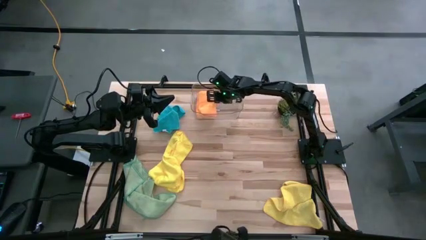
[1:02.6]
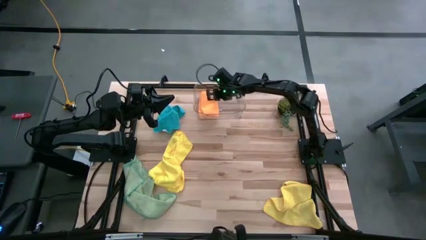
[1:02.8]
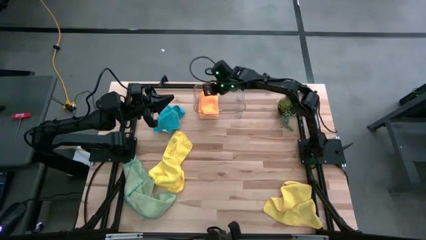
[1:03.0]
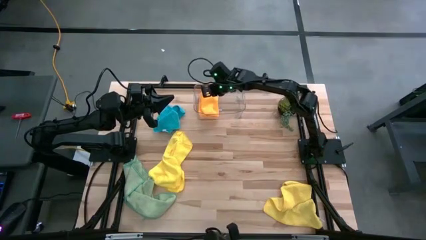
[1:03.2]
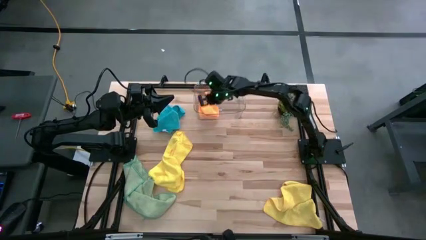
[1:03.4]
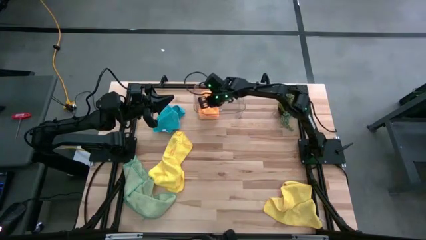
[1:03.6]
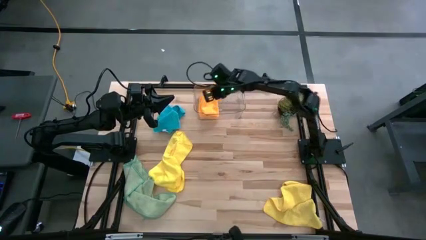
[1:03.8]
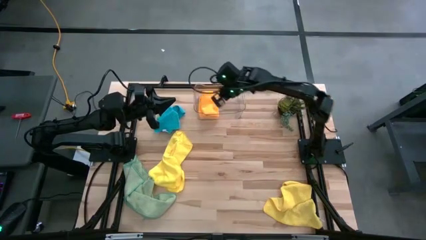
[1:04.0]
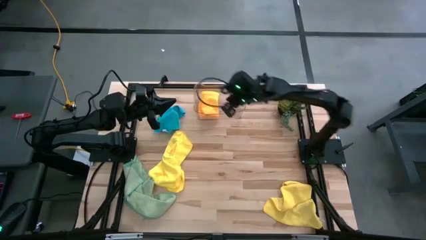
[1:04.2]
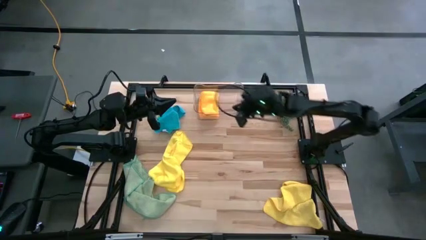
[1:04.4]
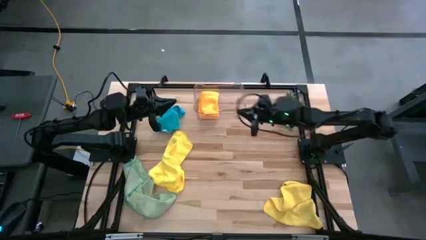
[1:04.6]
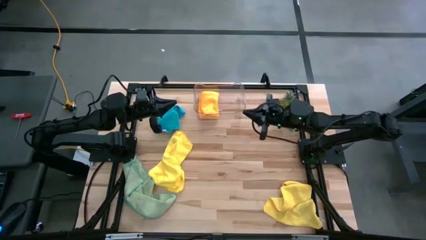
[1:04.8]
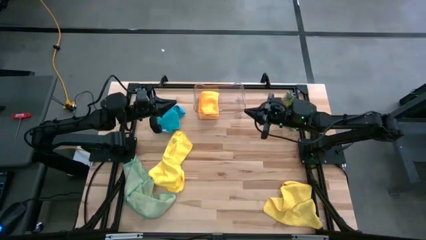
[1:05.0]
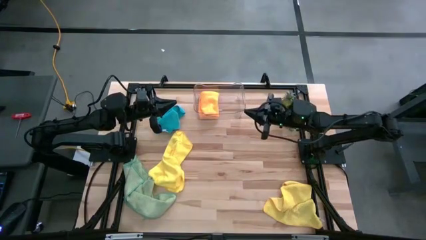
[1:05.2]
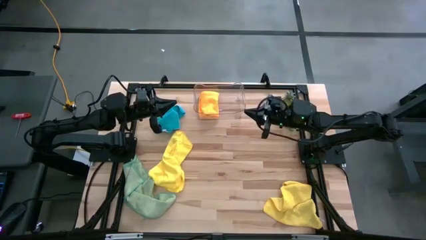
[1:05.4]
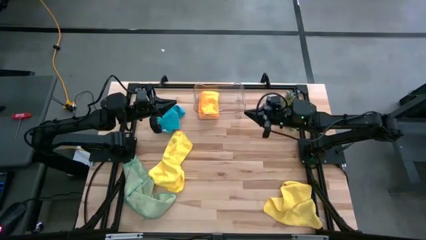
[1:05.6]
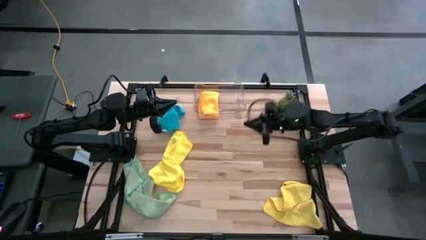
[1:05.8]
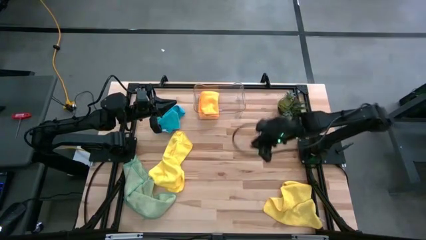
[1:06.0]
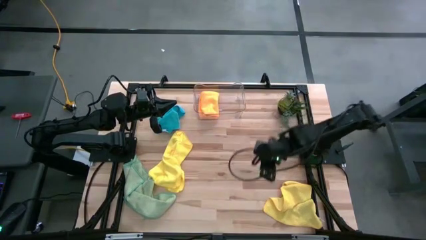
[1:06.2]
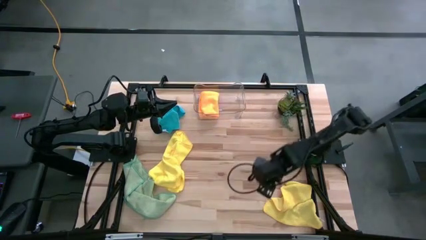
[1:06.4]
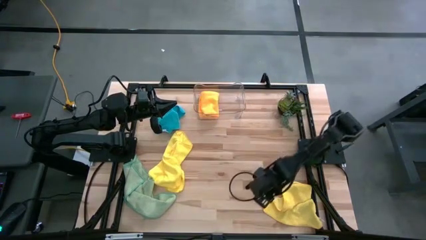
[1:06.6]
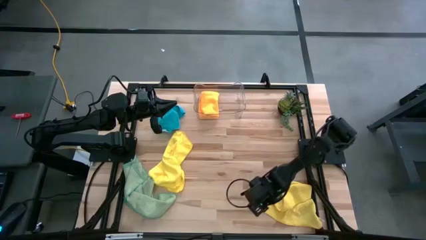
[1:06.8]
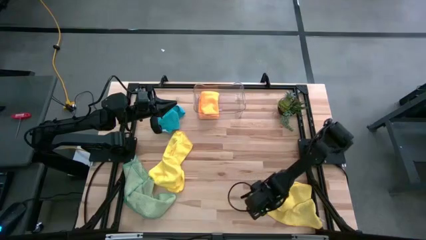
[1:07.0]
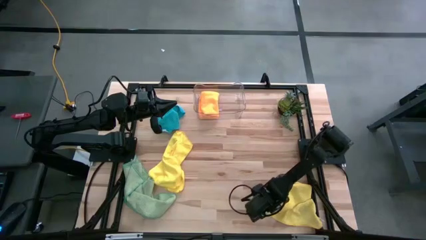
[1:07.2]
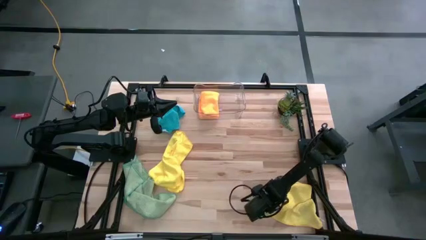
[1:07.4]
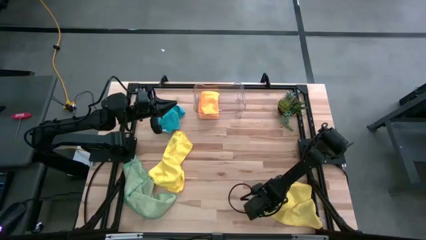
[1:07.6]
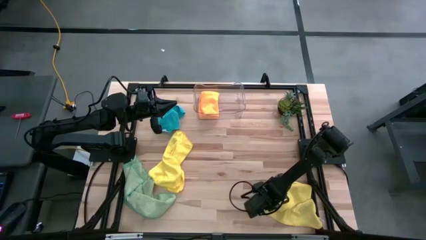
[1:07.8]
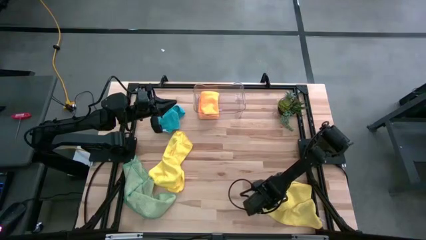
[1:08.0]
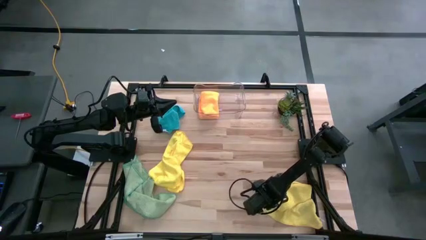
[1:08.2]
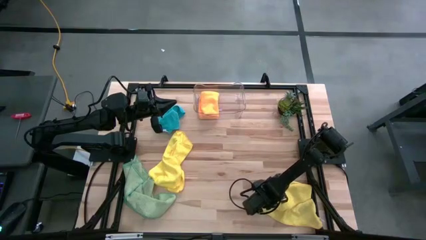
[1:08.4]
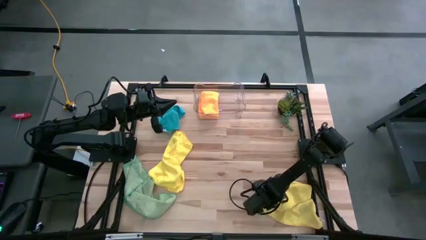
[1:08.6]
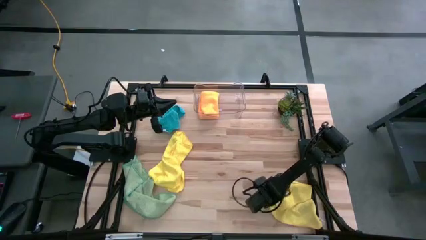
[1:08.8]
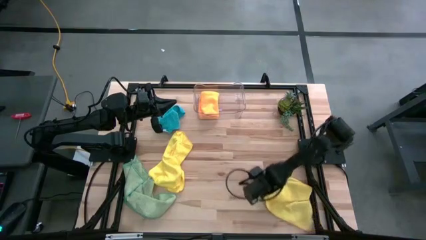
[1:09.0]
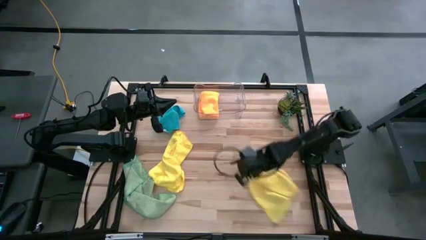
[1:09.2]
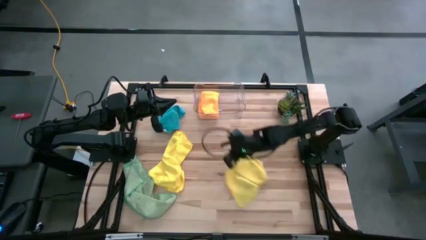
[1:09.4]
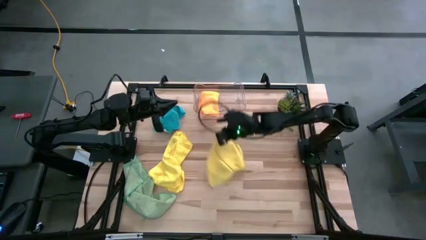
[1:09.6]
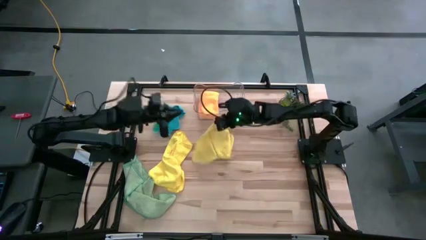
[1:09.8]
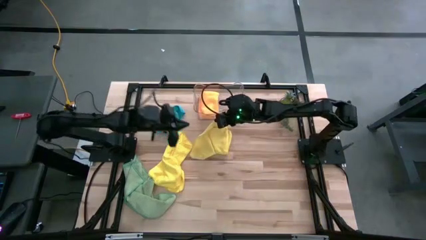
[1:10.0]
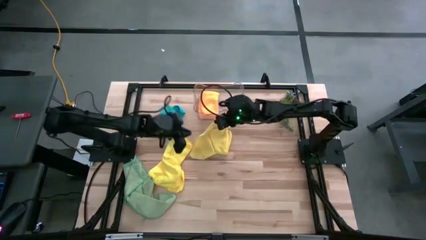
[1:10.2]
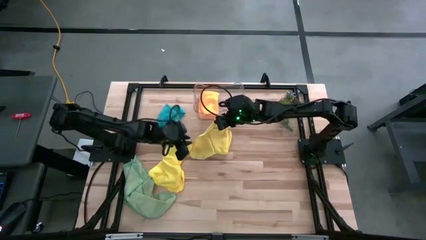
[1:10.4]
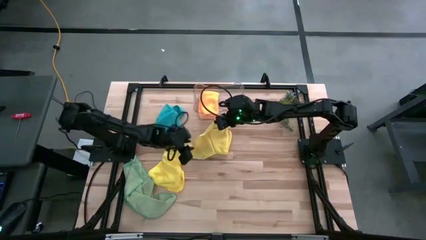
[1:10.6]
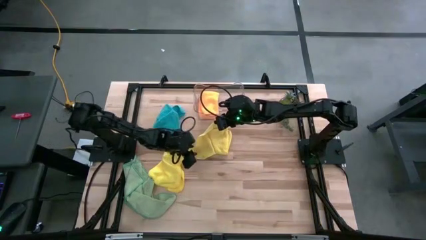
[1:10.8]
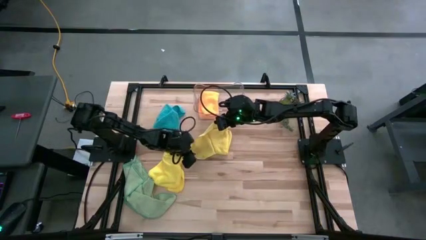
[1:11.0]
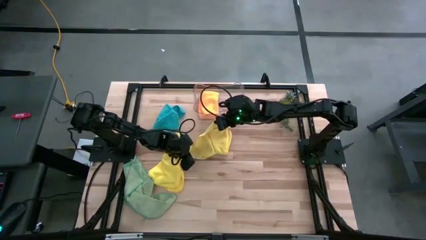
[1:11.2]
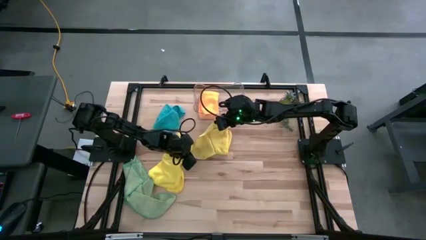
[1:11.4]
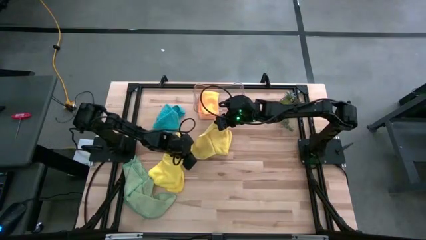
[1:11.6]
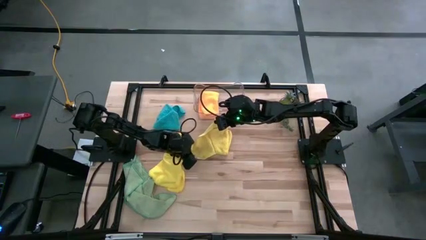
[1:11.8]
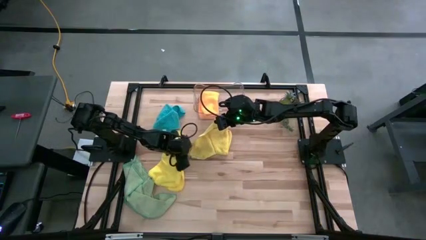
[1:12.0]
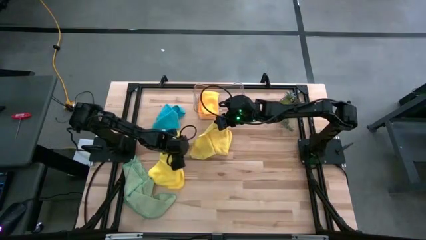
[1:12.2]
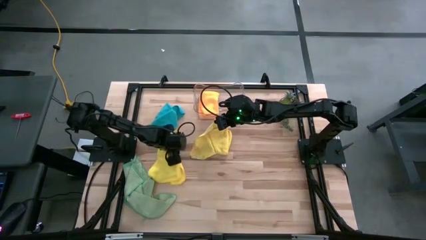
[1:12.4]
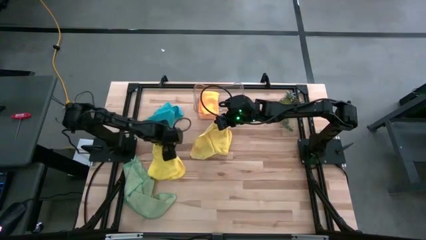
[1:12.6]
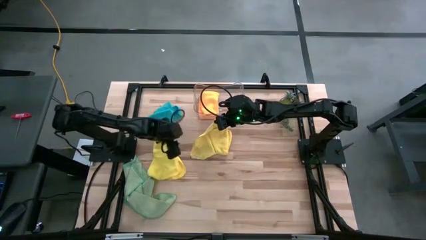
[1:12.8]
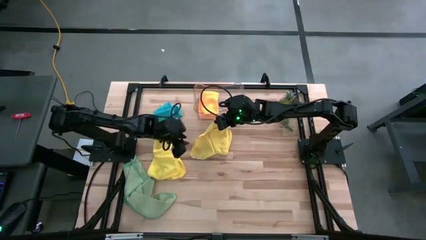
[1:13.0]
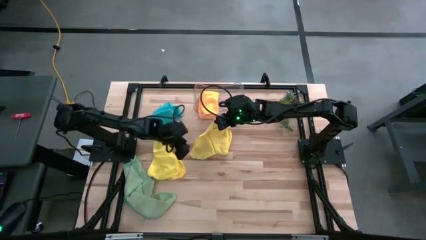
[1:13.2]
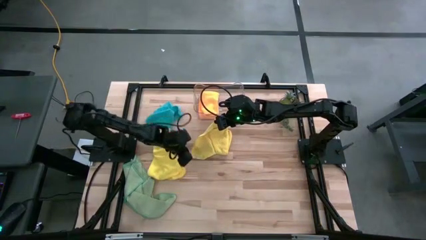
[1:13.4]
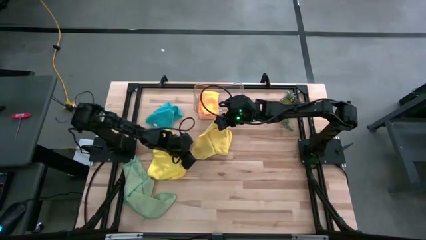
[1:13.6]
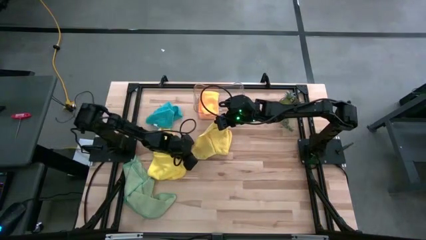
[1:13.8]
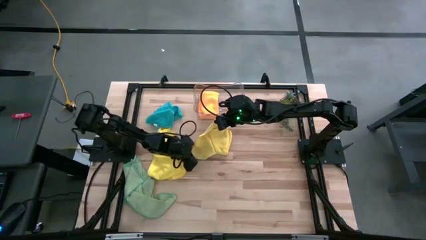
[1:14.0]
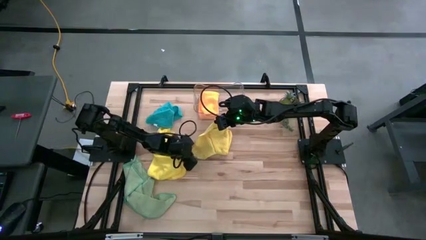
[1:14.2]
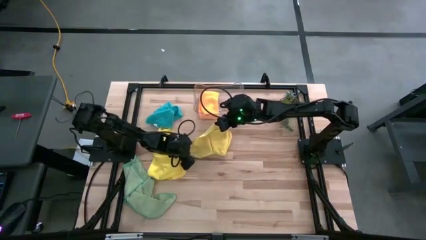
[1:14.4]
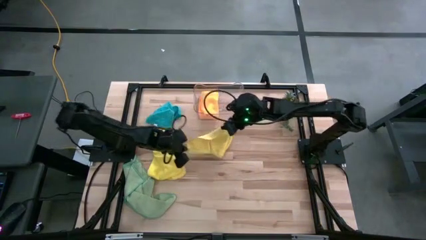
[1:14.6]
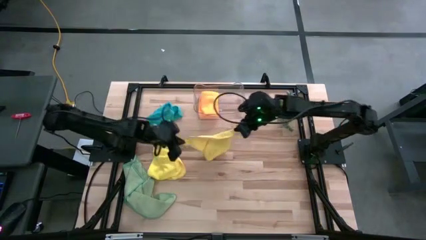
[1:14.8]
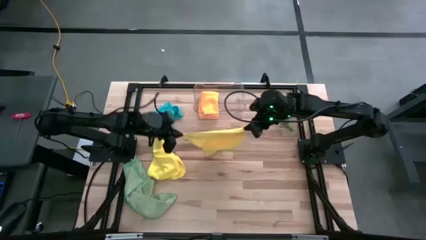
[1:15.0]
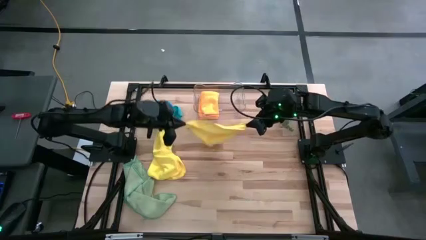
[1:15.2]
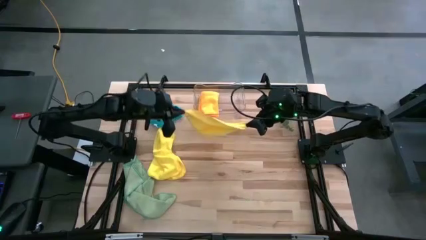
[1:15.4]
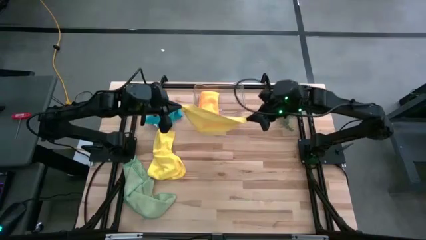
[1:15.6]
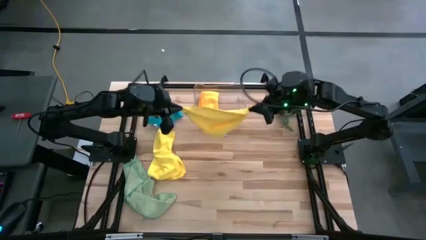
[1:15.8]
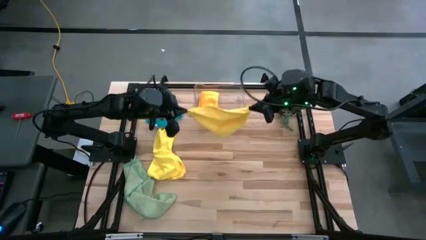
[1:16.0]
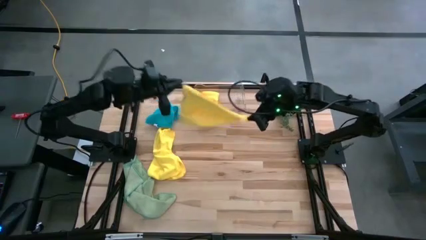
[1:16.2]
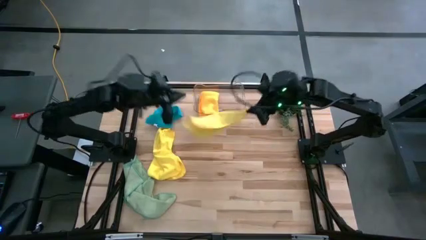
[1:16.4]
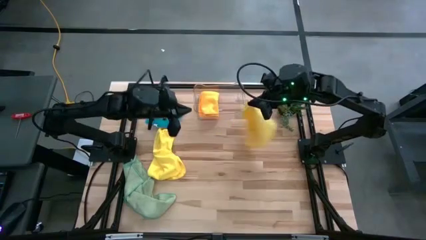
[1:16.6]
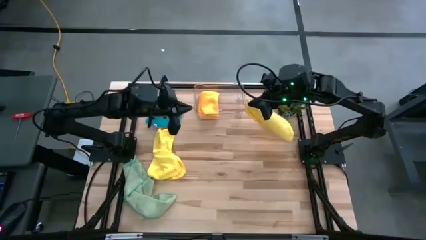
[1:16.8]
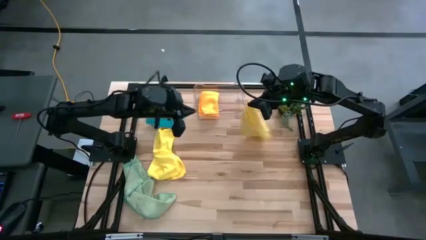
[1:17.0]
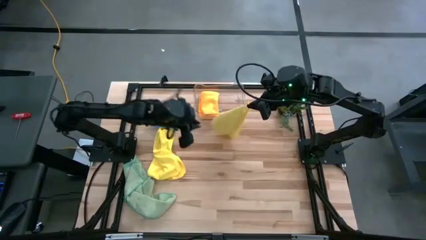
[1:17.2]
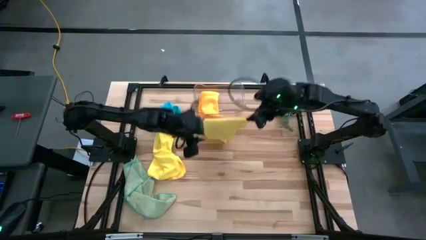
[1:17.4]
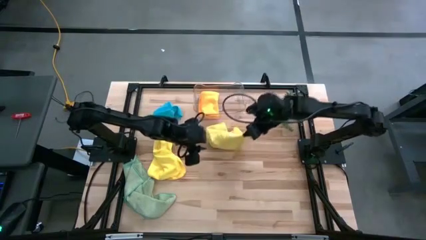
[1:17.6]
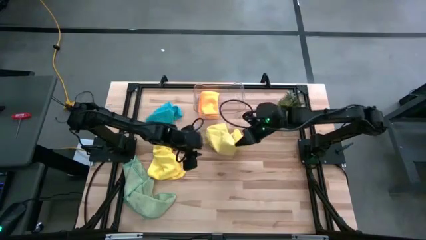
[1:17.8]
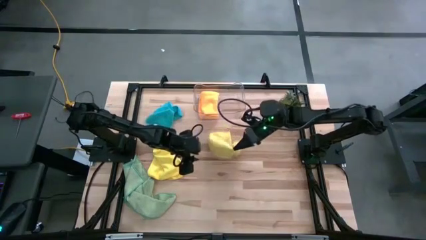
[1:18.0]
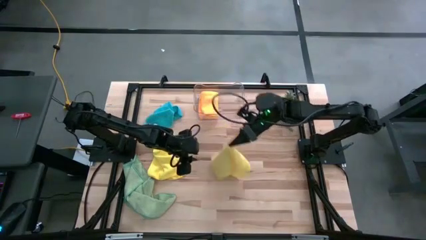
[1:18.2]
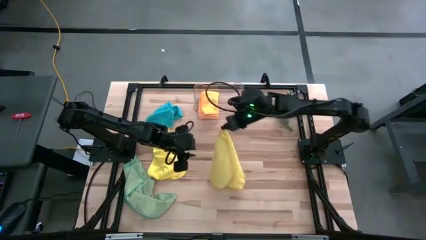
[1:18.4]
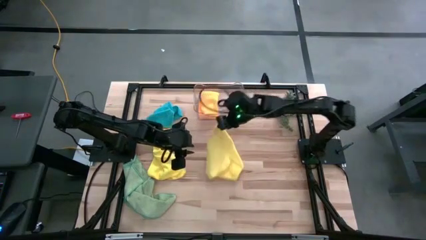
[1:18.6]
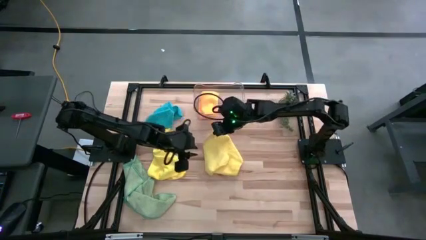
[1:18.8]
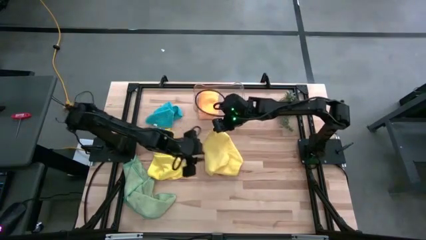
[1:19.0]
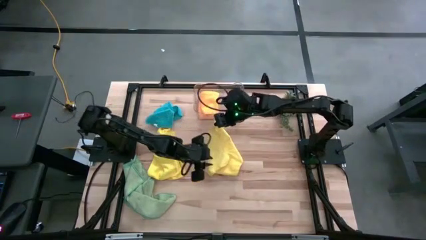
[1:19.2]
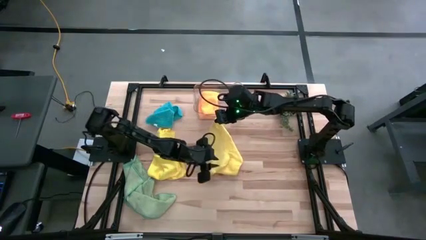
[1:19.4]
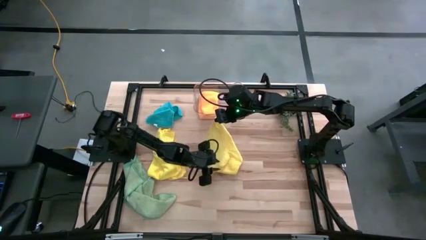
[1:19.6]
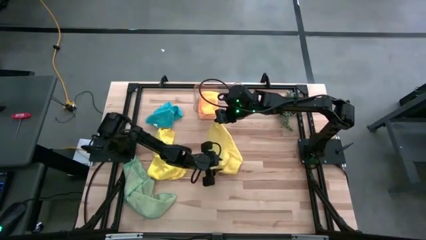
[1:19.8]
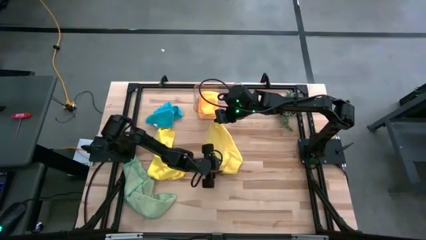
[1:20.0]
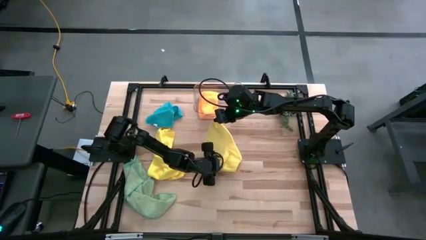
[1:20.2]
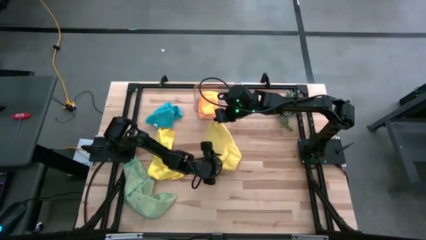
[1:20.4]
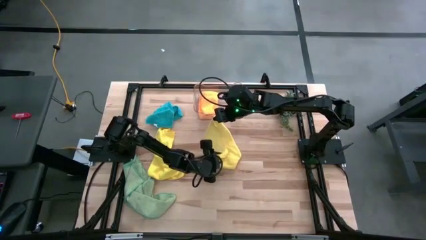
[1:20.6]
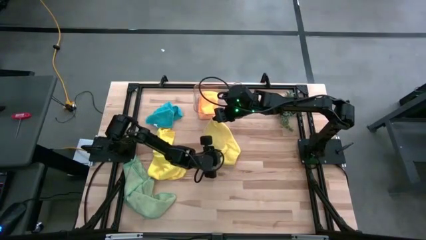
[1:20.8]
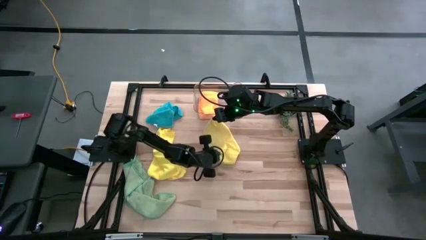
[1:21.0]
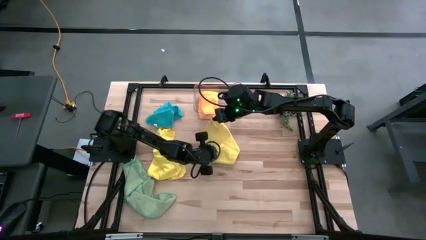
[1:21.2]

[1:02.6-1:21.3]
Task: Fold microfiber towels
Fold the right yellow microfiber towel
